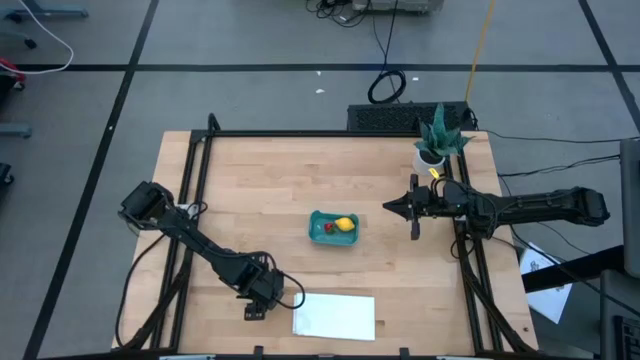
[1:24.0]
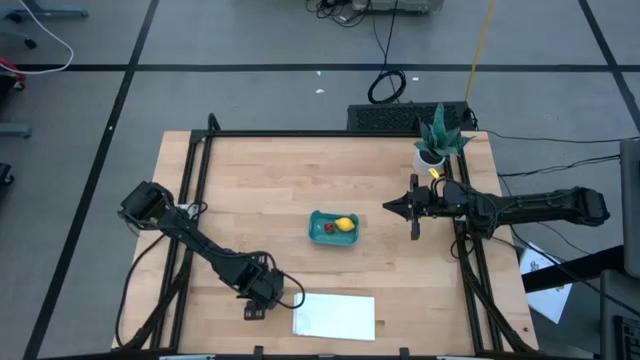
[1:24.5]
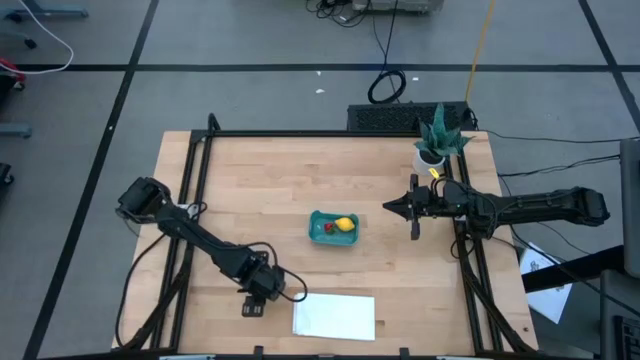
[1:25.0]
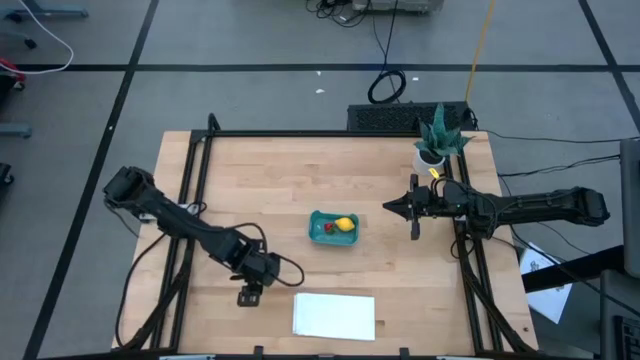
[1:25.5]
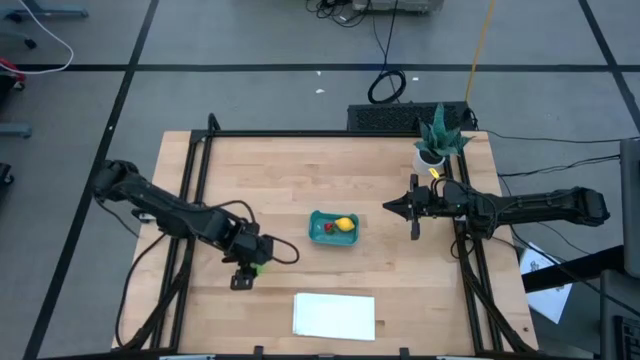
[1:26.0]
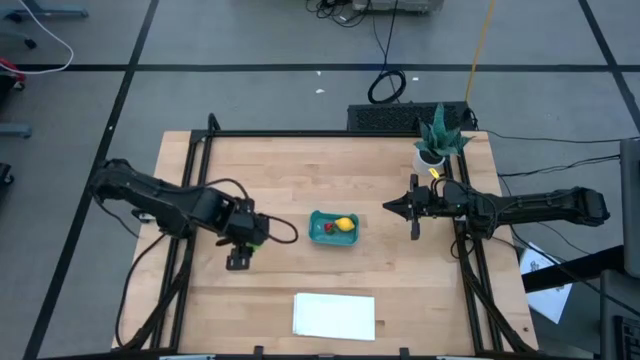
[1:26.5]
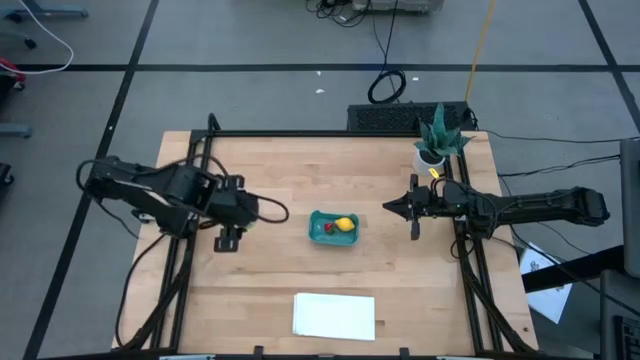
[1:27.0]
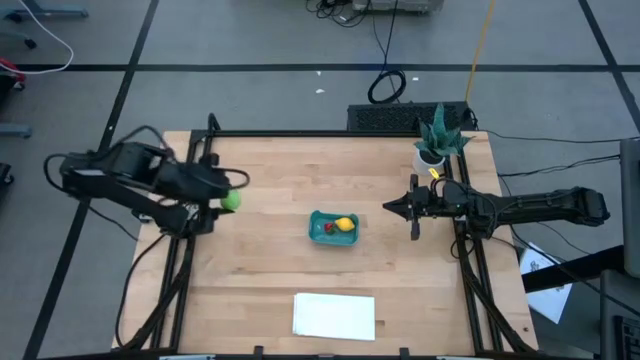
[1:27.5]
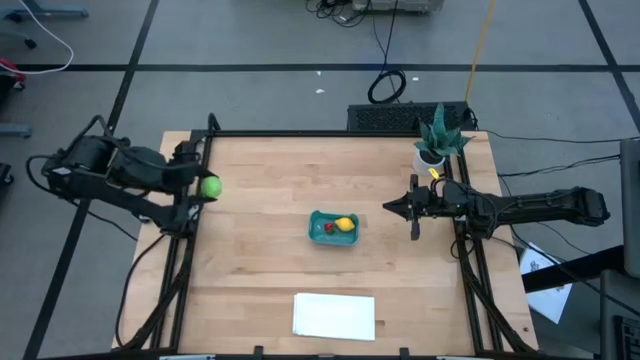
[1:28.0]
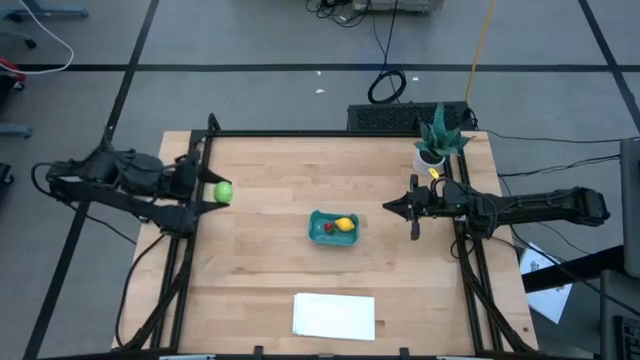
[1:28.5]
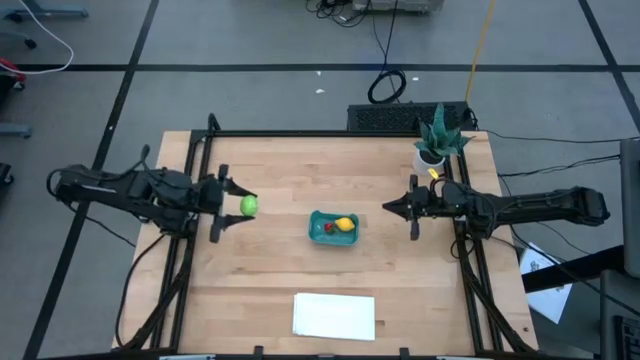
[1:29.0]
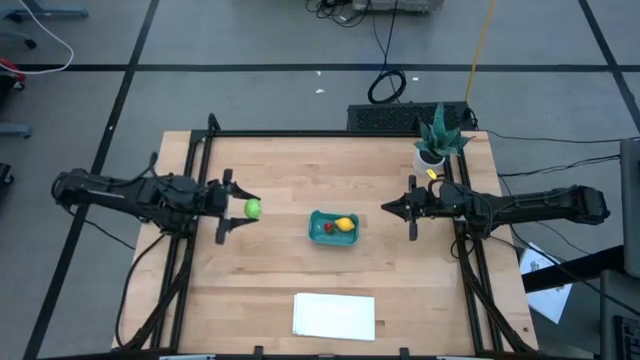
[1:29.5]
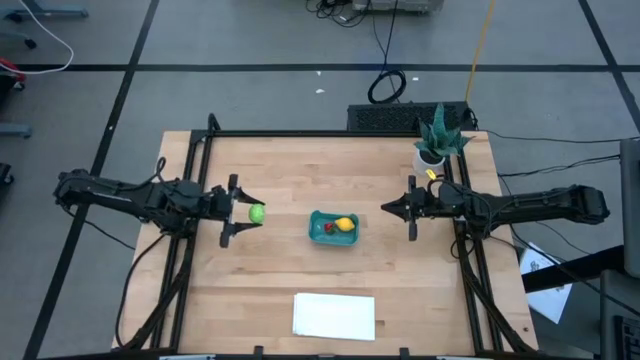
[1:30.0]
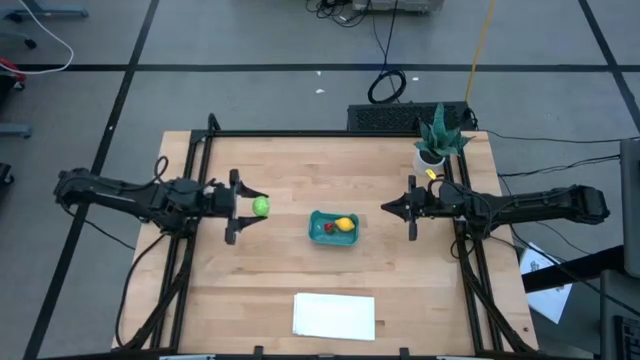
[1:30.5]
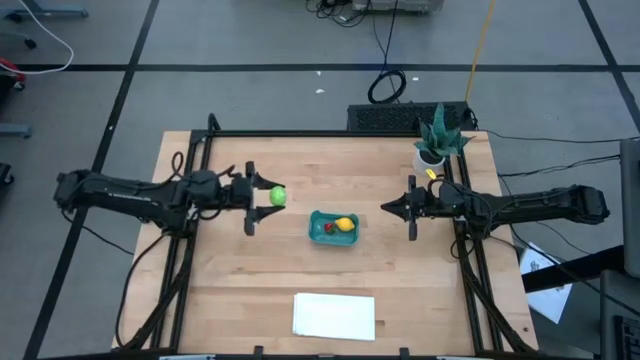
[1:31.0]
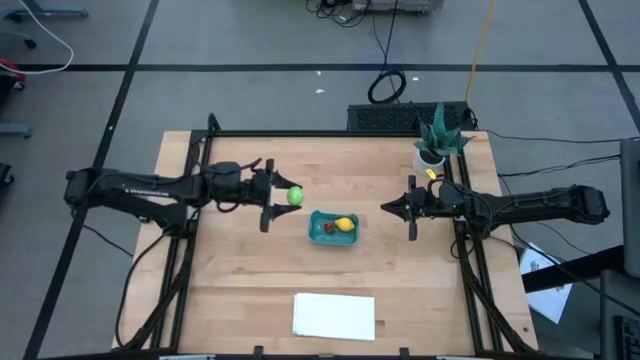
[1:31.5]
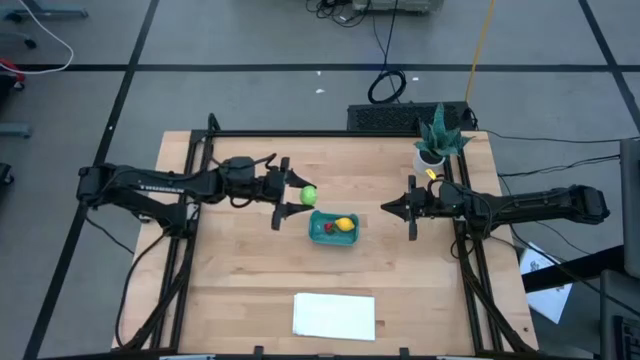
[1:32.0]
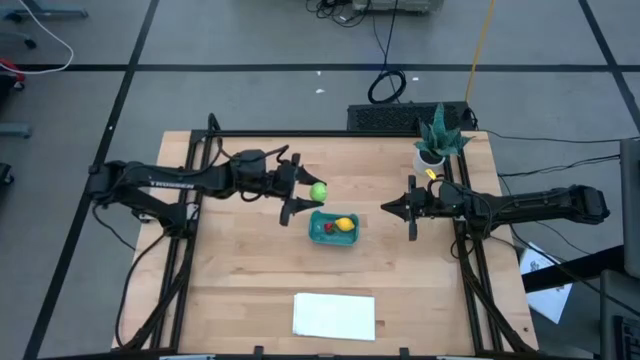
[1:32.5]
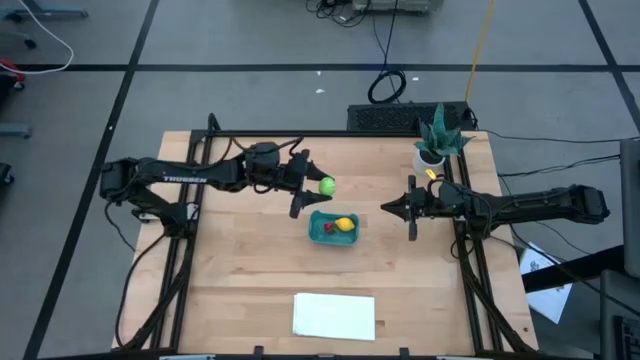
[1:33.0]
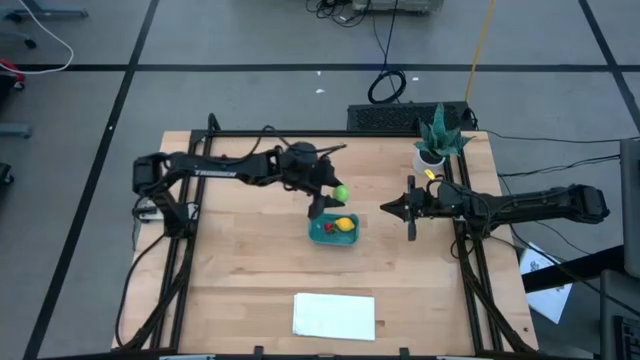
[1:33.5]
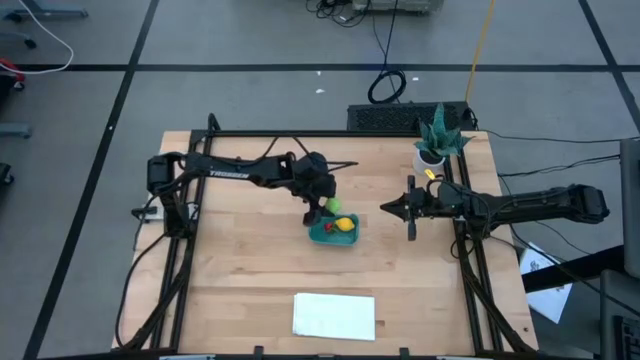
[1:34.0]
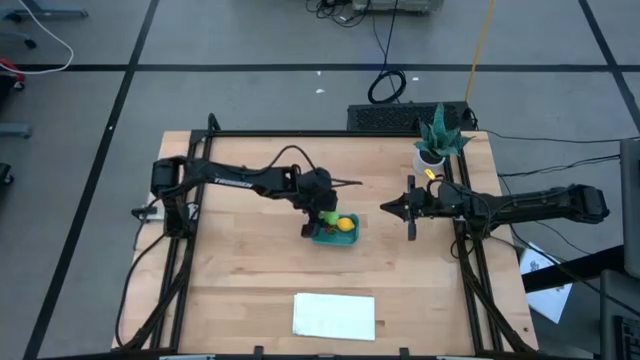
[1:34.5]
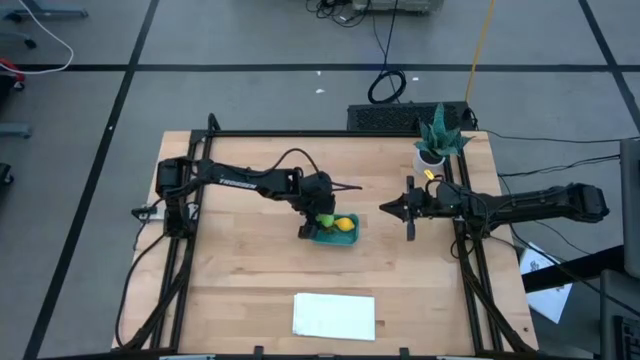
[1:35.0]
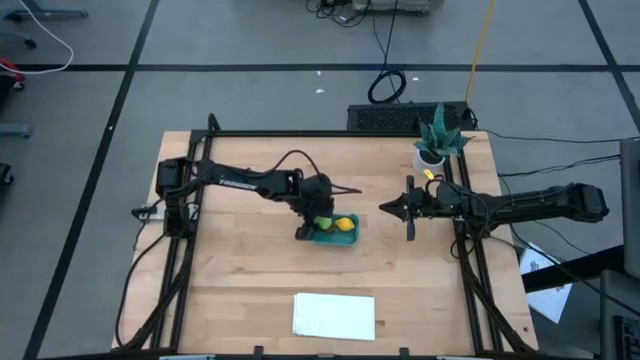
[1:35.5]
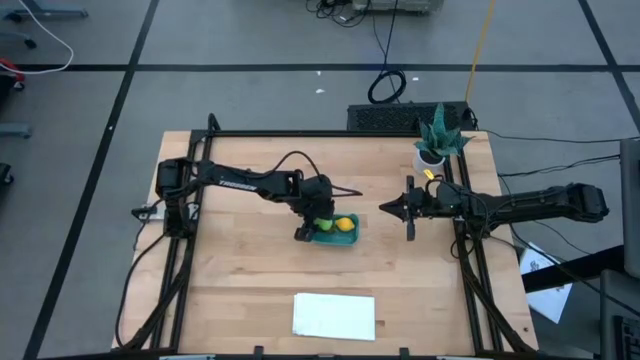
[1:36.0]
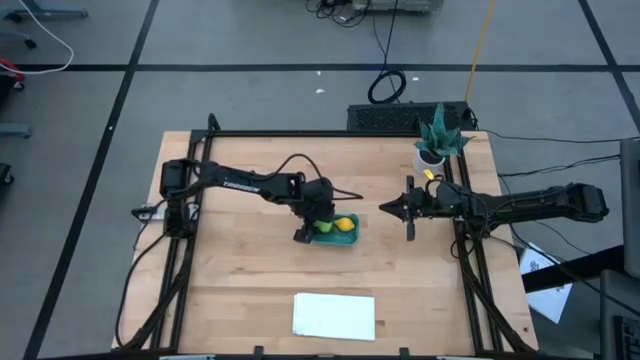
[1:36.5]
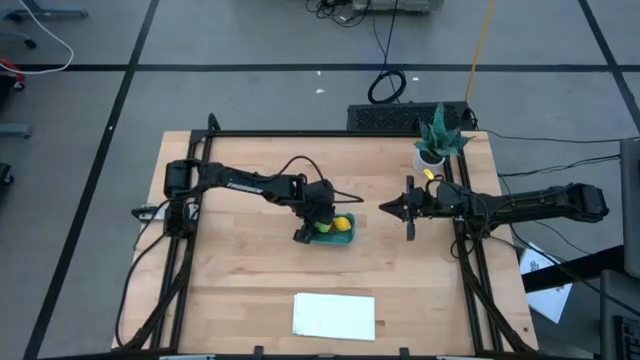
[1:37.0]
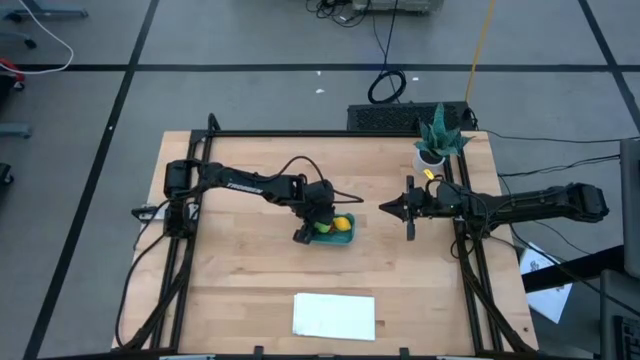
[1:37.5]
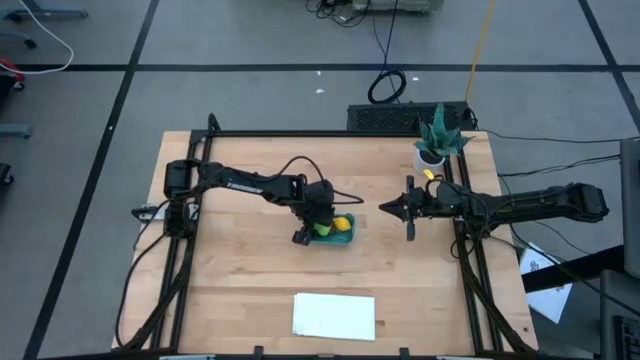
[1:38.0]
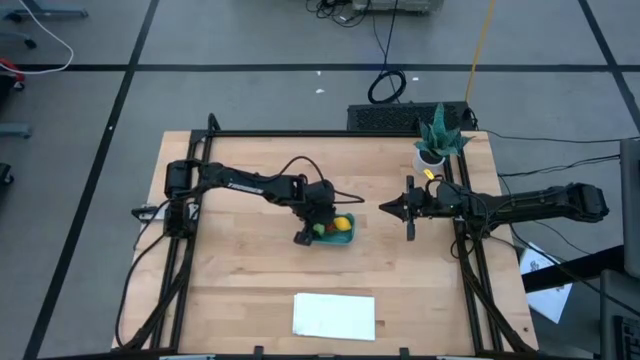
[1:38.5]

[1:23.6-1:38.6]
Task: Pick and placing Produce into tupperware
Put the green cabbage into the blue bin

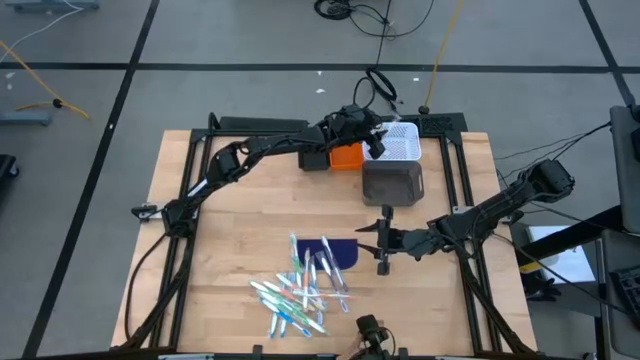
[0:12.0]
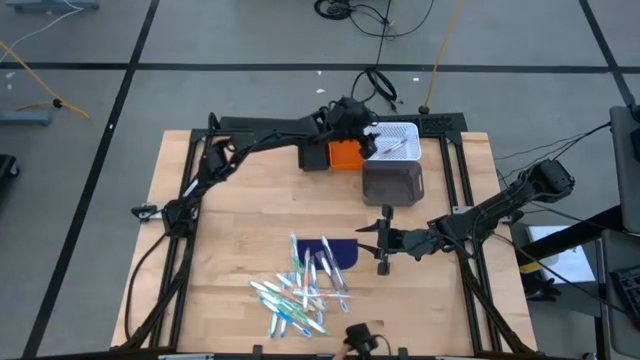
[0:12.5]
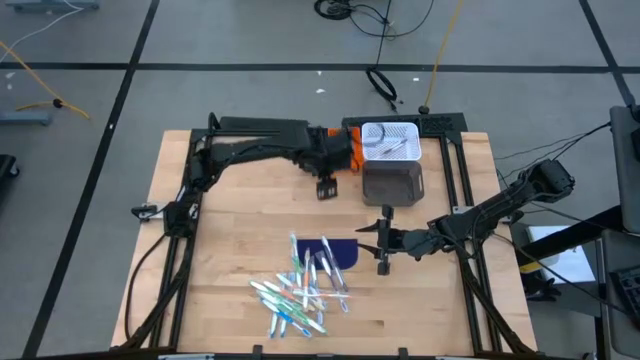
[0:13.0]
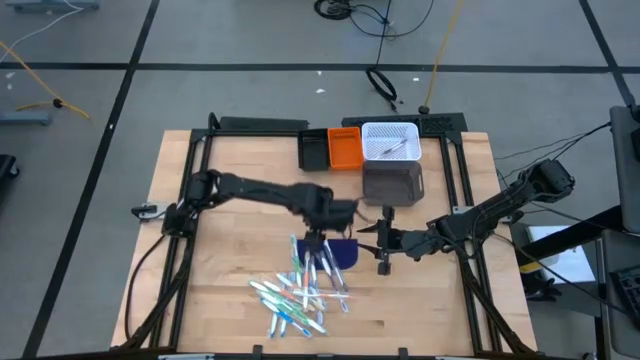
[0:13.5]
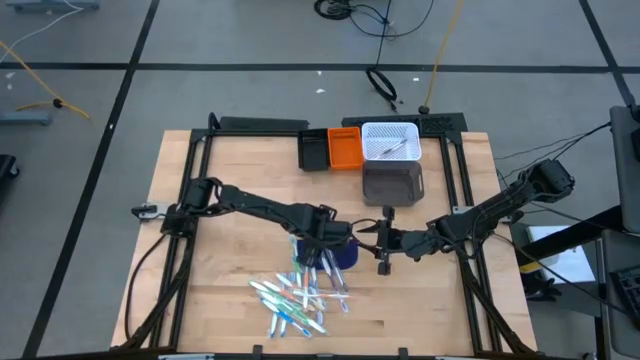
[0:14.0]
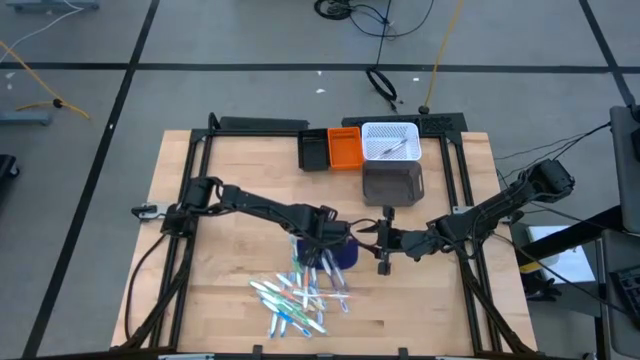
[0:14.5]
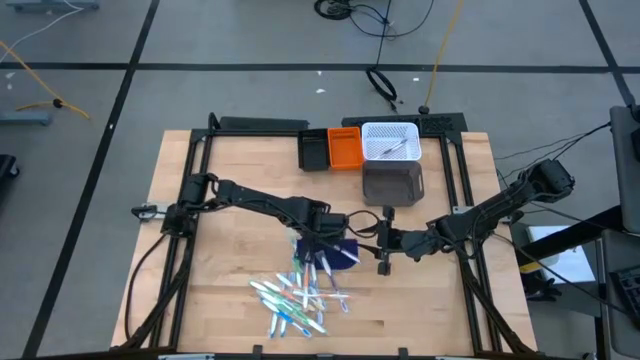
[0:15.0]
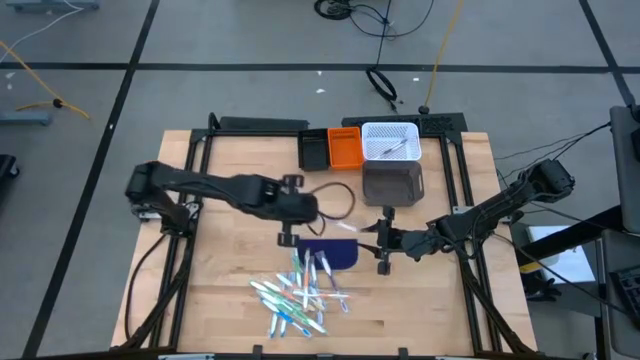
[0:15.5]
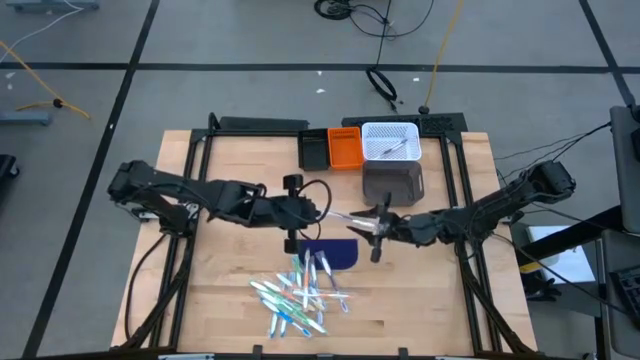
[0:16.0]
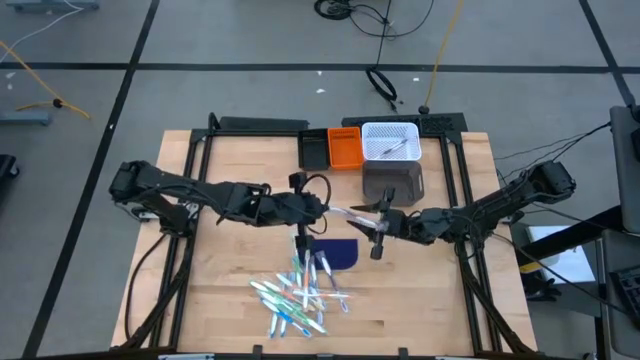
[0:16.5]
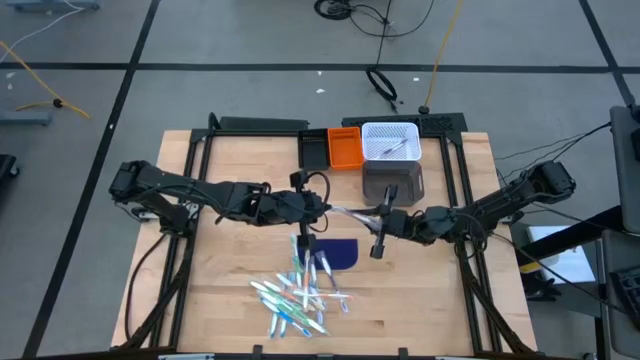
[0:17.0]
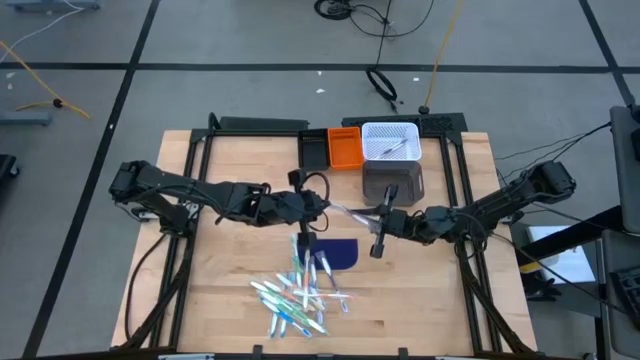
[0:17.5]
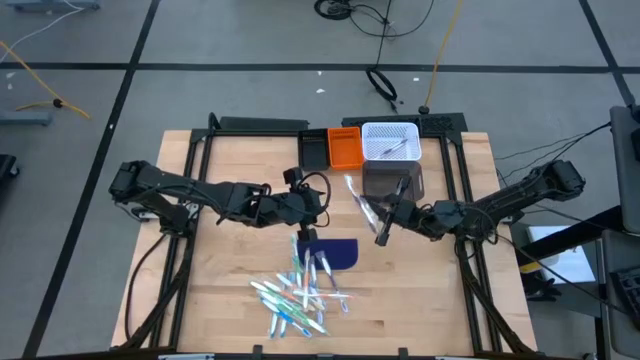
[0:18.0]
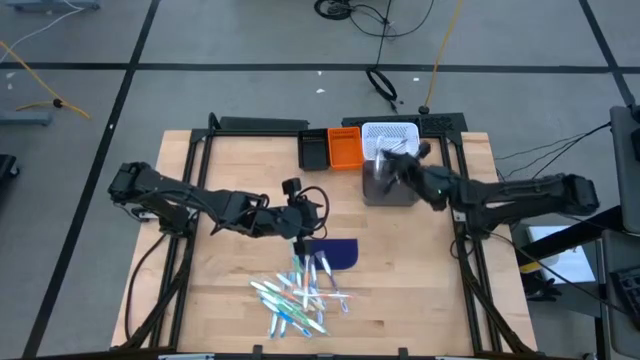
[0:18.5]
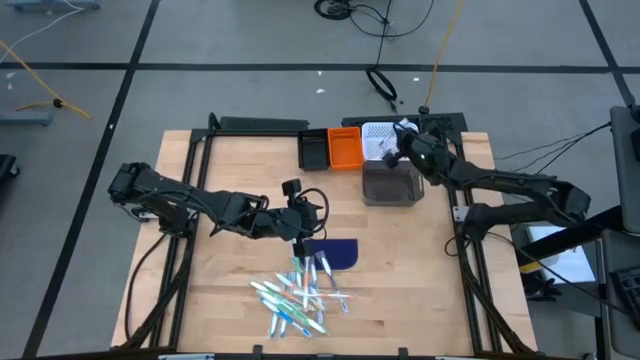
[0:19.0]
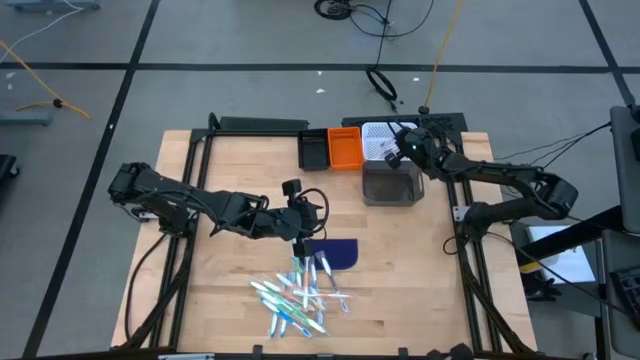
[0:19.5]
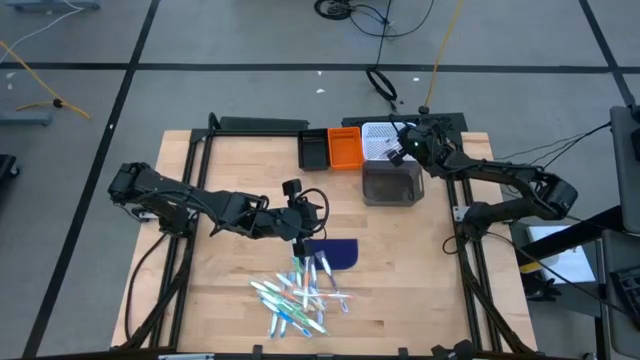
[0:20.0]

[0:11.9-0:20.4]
Task: Pick & Place Toothbrushes
Put the purple toothbrush into the white bin
